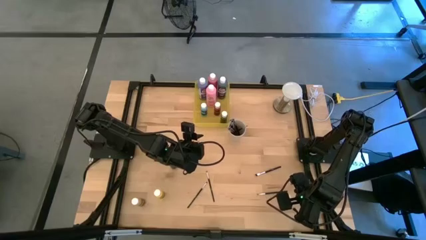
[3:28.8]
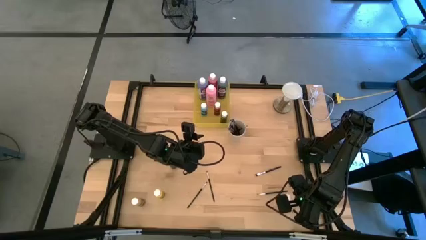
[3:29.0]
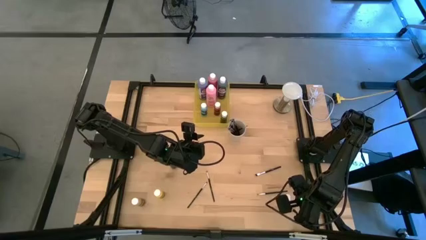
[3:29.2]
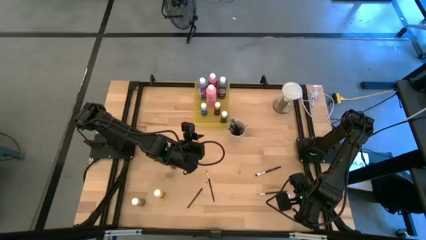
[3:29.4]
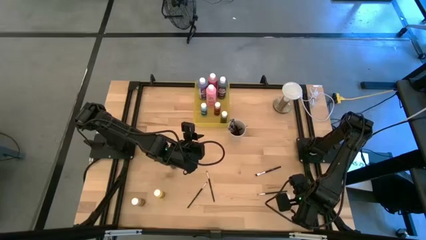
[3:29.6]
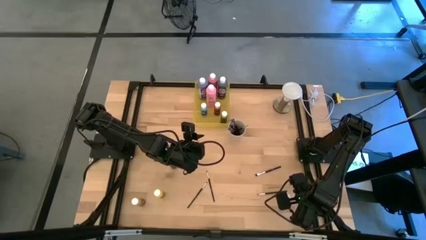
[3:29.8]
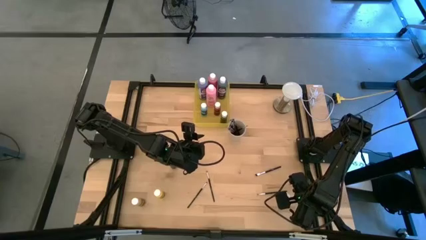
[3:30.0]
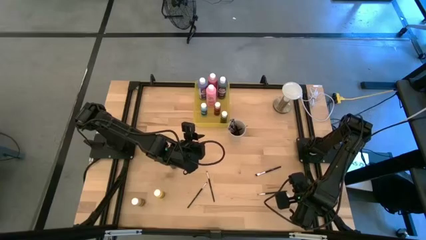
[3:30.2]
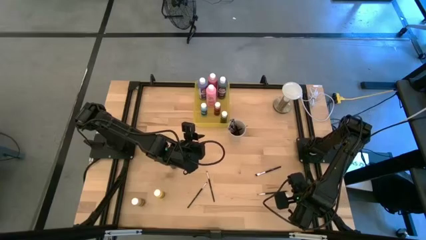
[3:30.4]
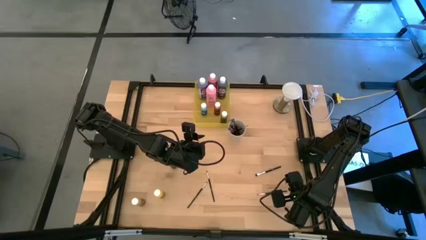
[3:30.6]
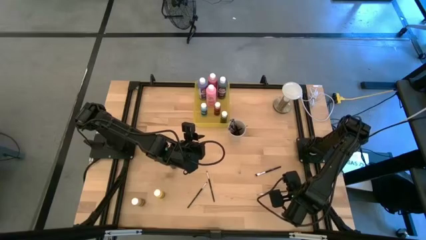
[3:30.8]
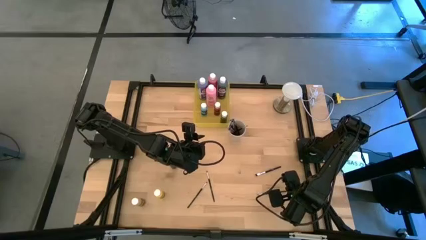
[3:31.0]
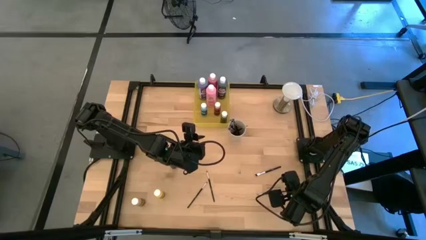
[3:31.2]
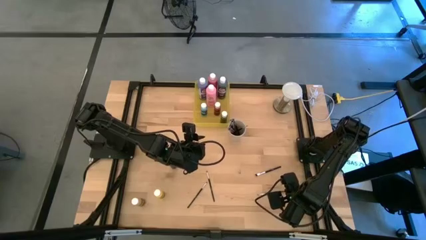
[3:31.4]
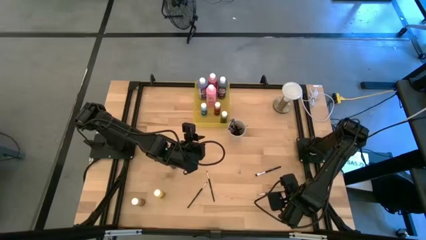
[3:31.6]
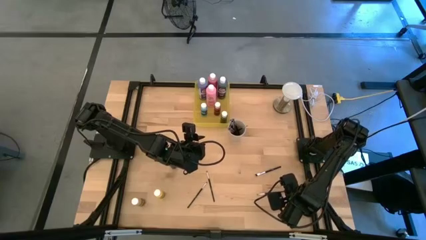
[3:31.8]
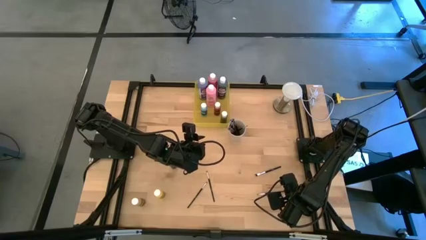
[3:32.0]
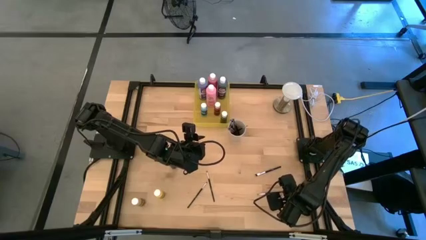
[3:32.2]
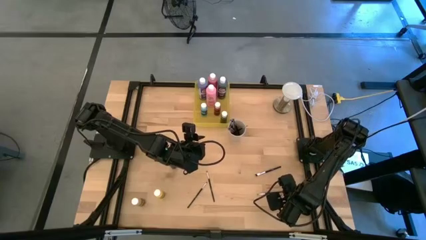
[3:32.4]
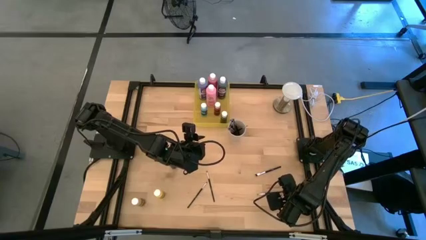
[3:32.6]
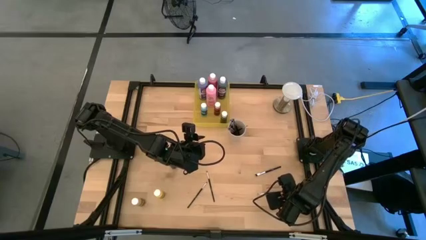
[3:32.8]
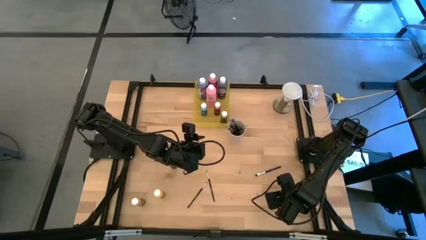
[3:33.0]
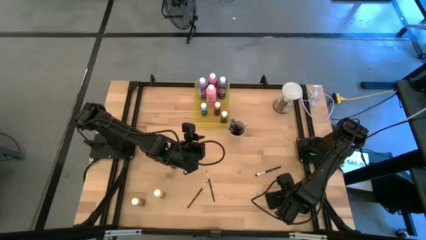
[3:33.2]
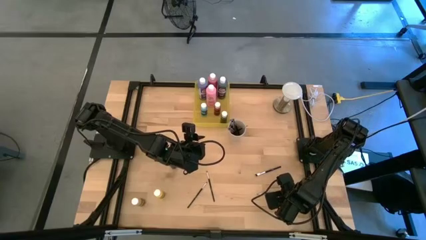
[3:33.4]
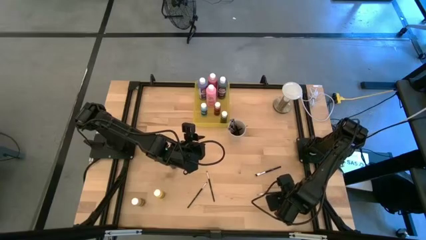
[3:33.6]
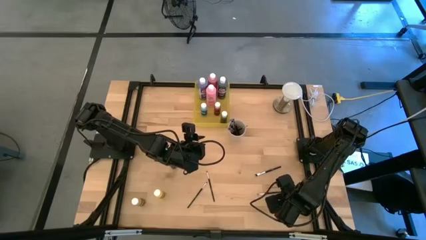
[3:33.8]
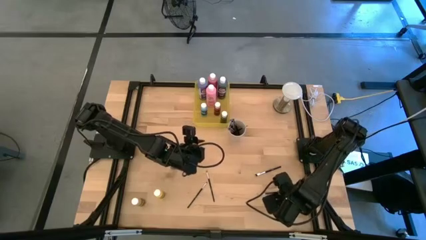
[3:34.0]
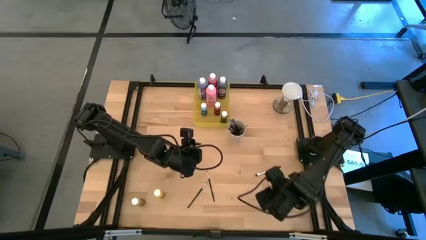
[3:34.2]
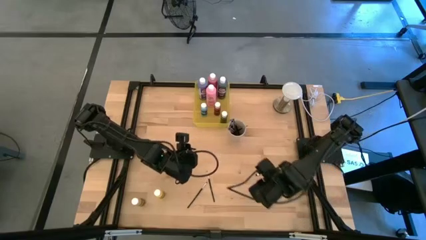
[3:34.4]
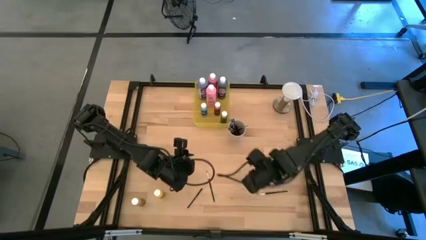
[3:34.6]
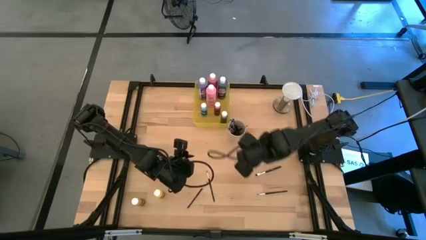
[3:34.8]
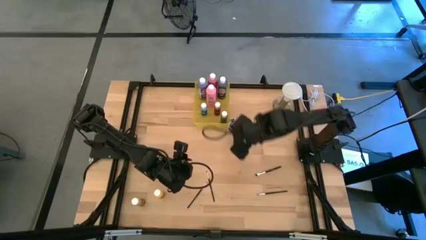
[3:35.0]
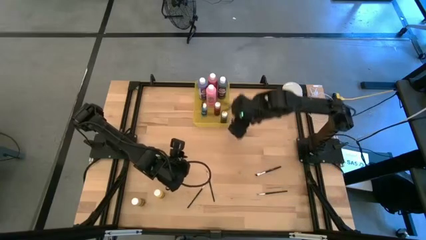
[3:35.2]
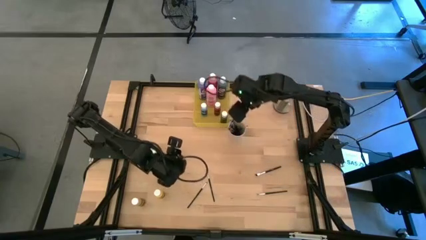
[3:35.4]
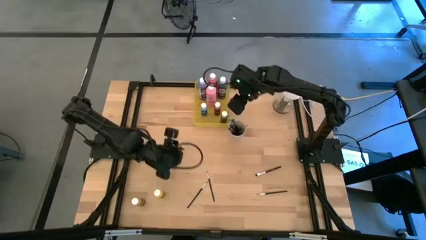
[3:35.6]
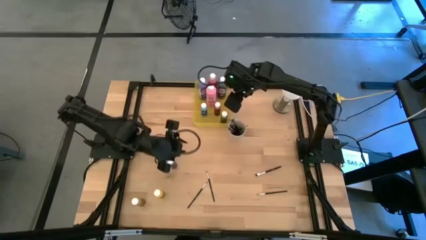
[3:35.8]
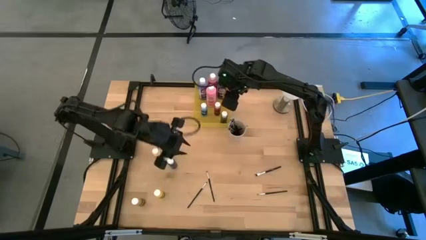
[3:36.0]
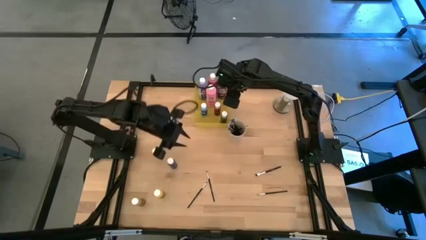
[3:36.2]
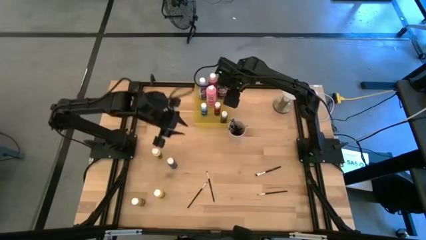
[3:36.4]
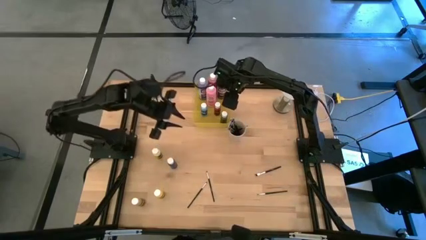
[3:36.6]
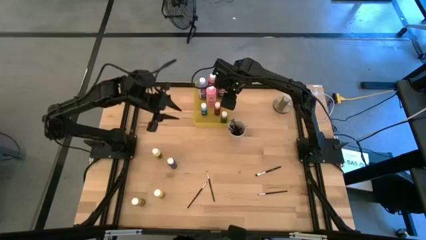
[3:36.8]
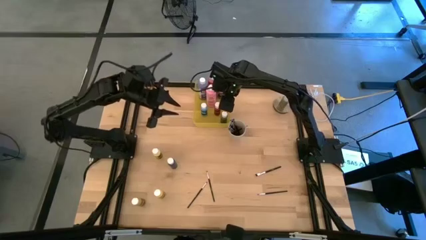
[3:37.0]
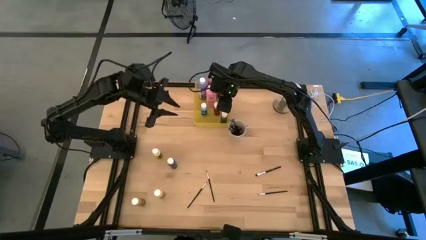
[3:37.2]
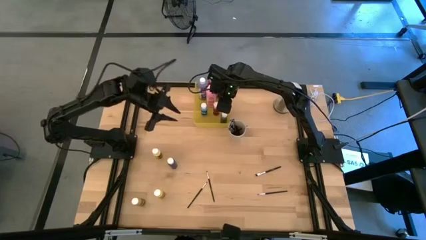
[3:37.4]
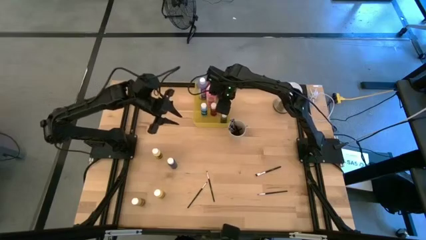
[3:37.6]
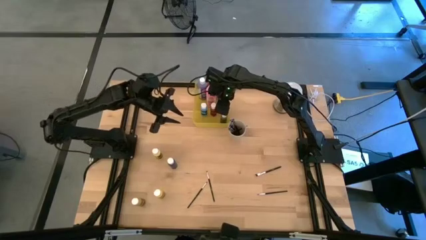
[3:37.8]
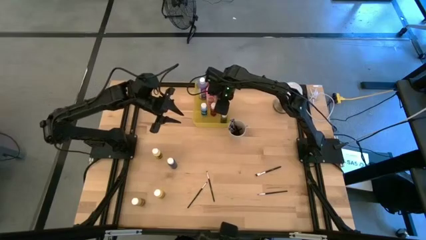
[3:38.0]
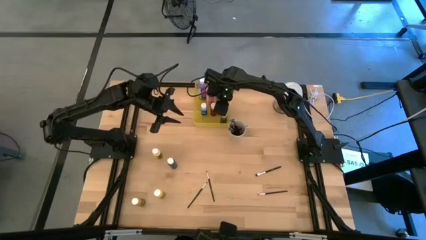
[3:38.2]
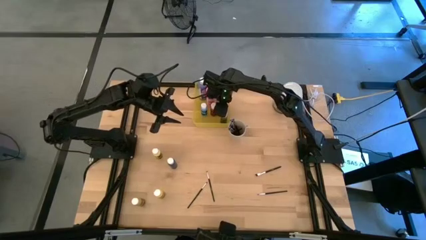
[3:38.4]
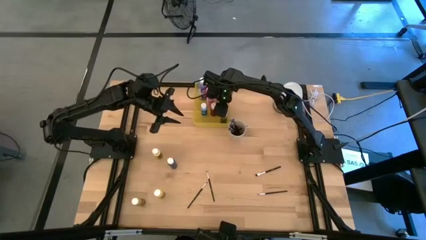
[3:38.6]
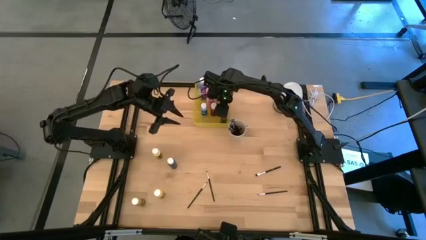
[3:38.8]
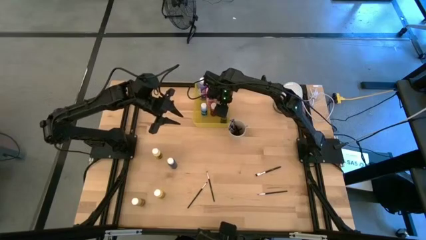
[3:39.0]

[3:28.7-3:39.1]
Task: Pick & Place Paint Supplies
Put the small light pink paint bottle into the yellow bin

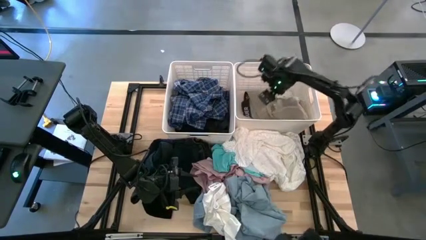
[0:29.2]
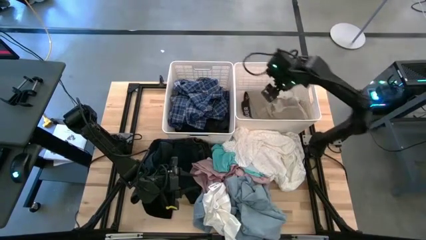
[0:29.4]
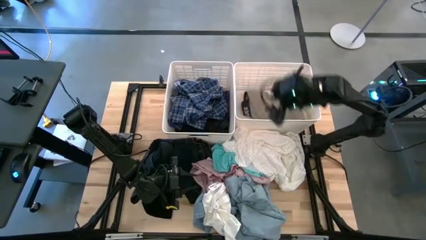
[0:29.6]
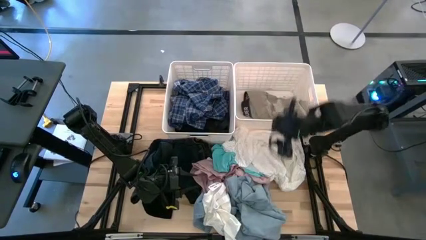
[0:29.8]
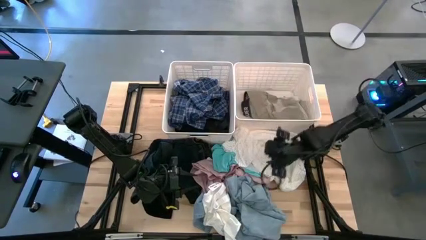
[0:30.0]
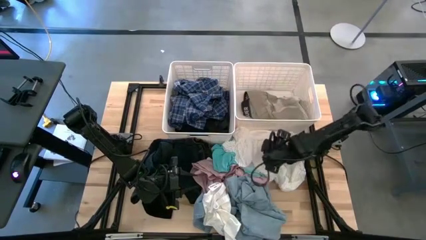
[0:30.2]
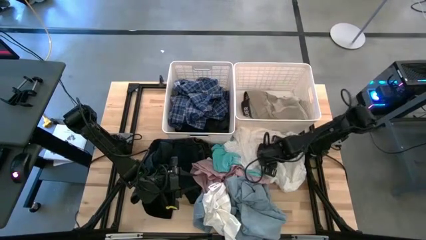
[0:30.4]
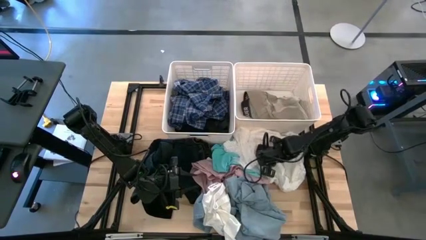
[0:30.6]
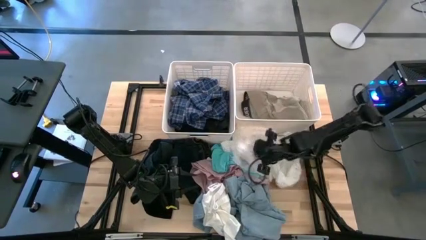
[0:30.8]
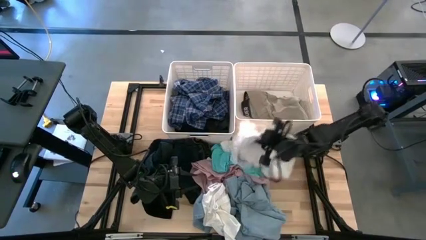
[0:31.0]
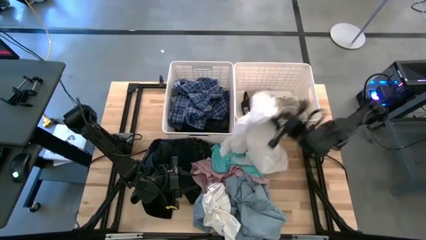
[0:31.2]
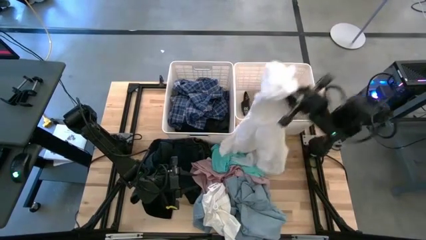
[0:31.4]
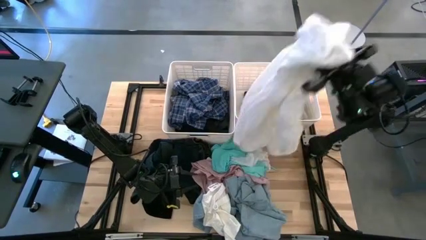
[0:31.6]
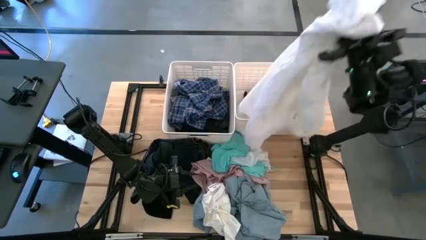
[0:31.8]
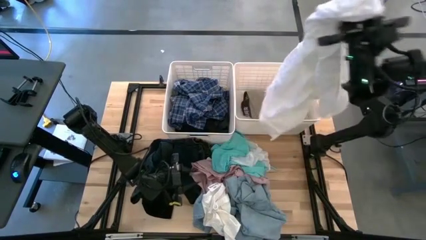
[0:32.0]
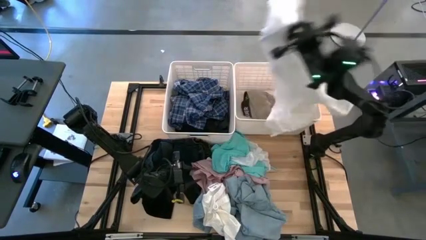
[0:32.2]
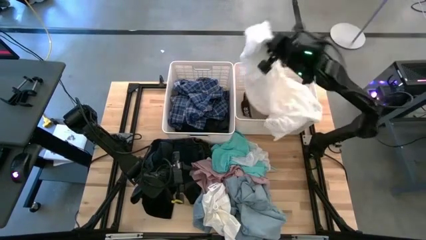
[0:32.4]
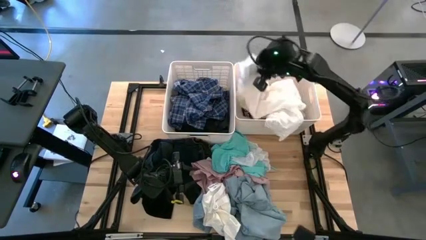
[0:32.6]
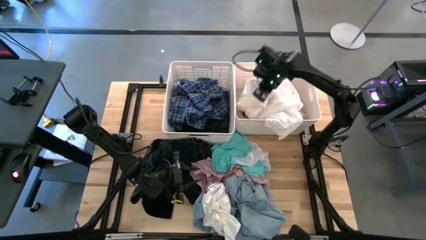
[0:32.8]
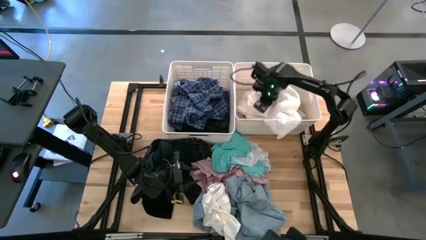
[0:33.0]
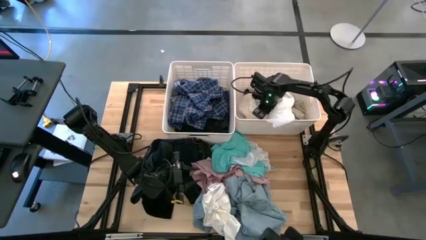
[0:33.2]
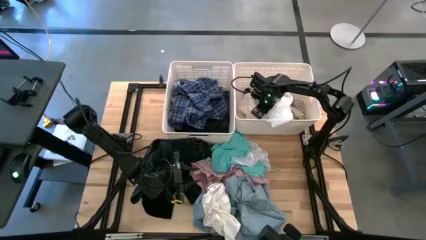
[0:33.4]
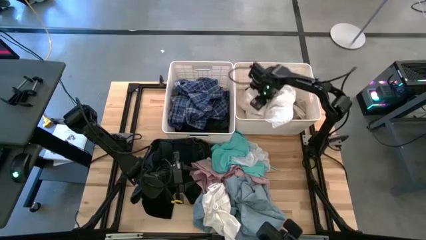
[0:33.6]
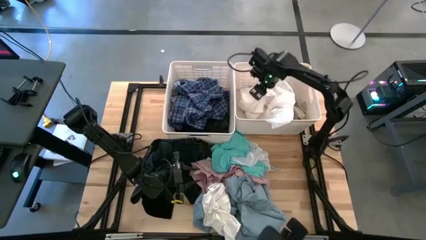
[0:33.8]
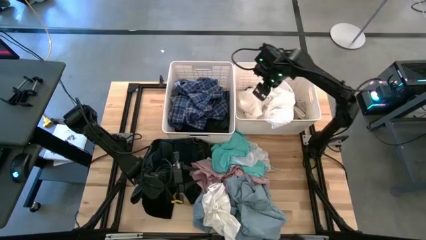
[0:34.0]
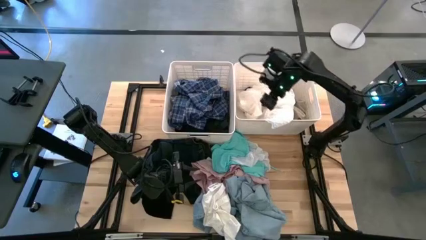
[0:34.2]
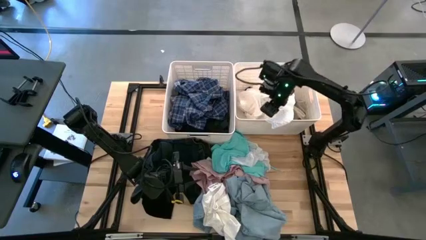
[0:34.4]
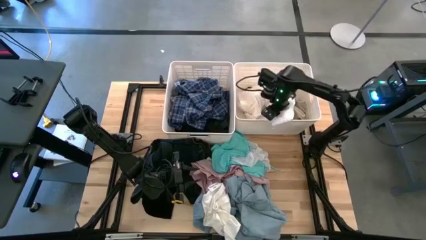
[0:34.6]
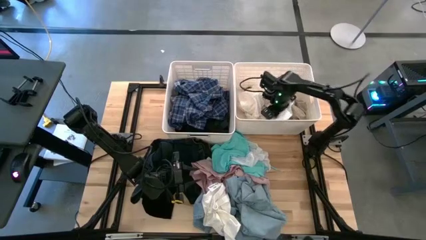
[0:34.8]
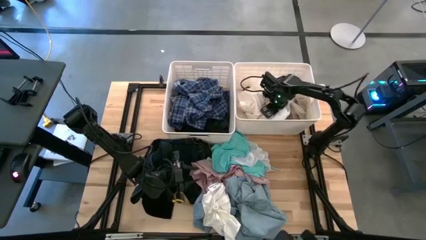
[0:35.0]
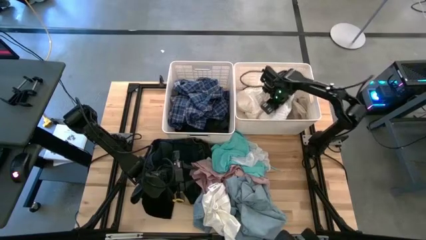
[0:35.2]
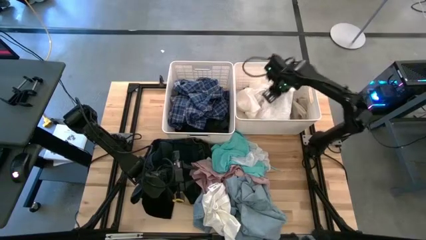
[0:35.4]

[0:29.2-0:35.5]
Task: Sort clothes
Put the white shirts into the right white bin
